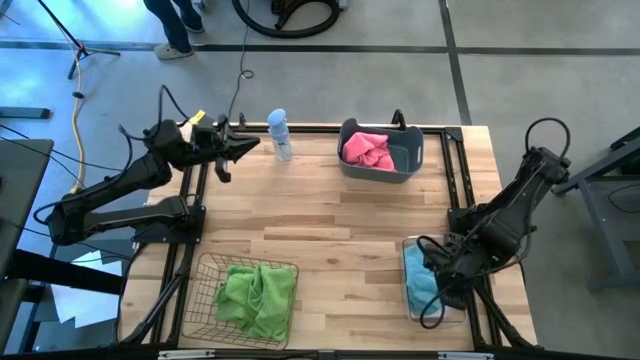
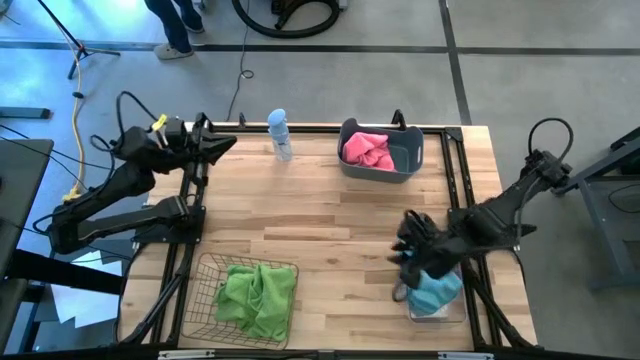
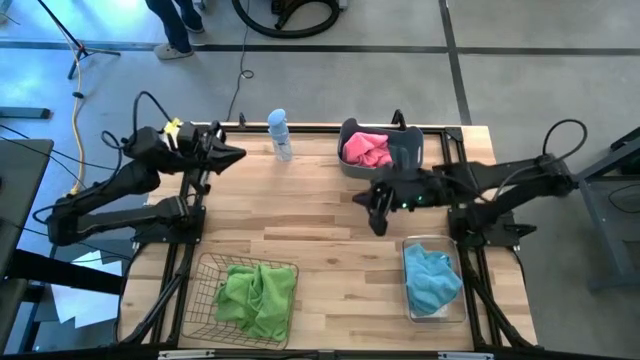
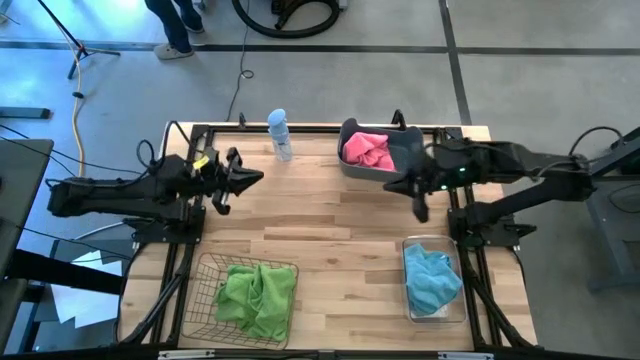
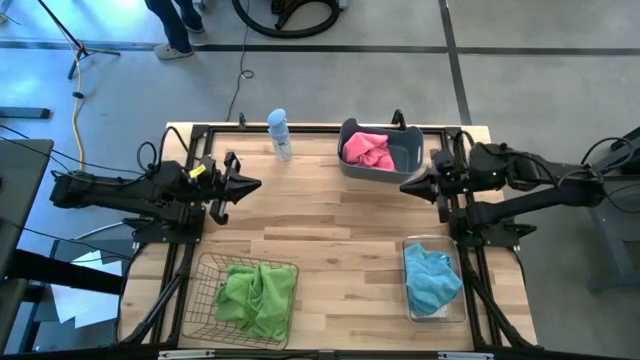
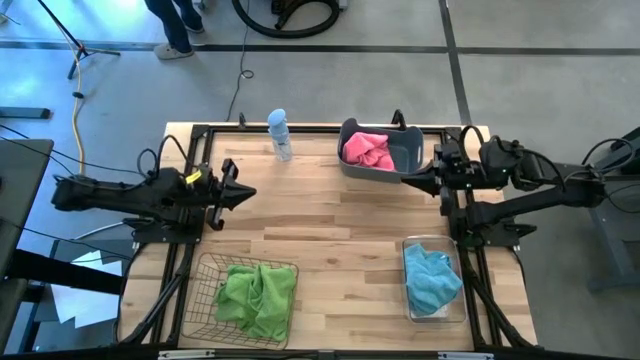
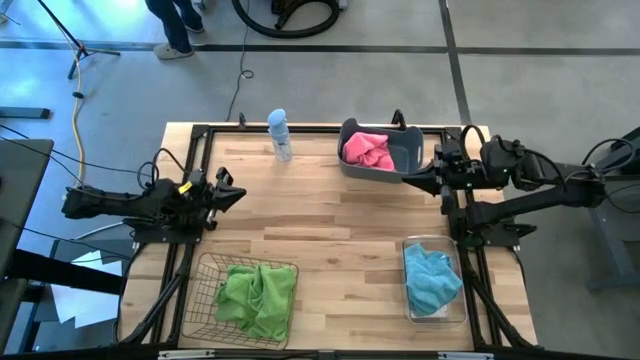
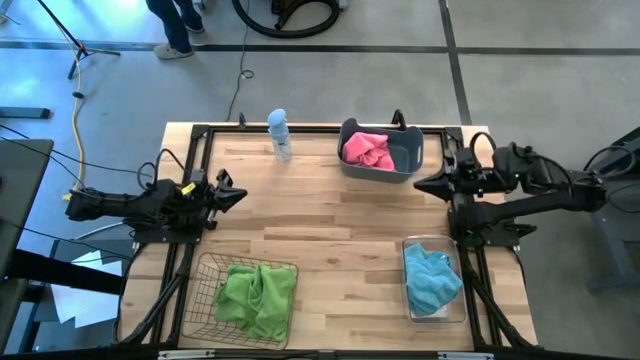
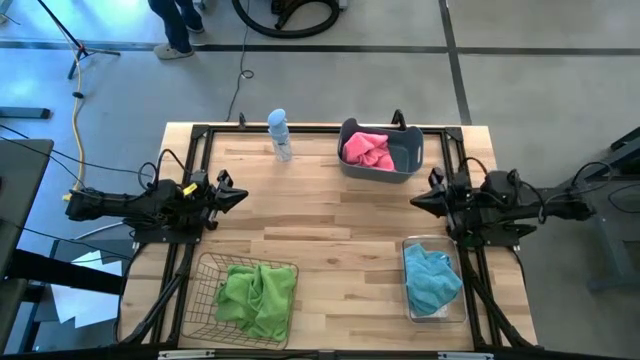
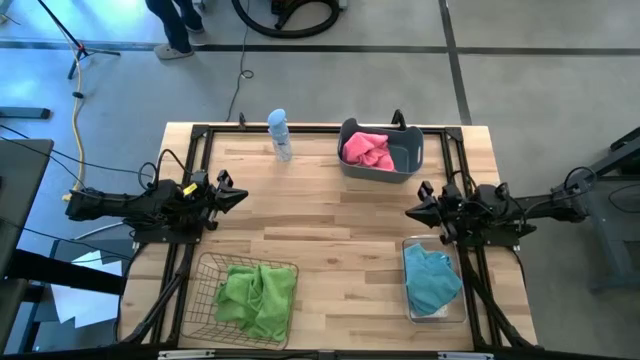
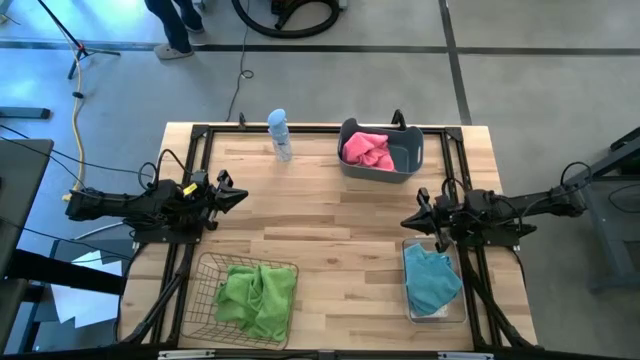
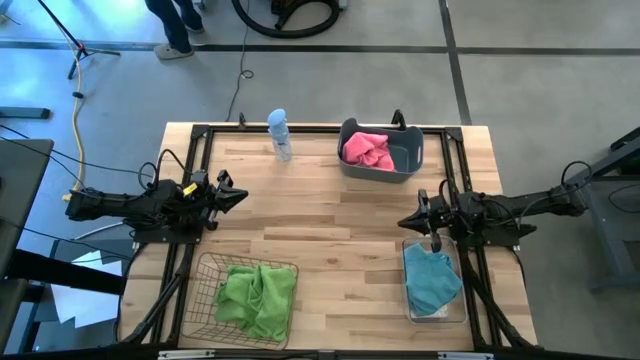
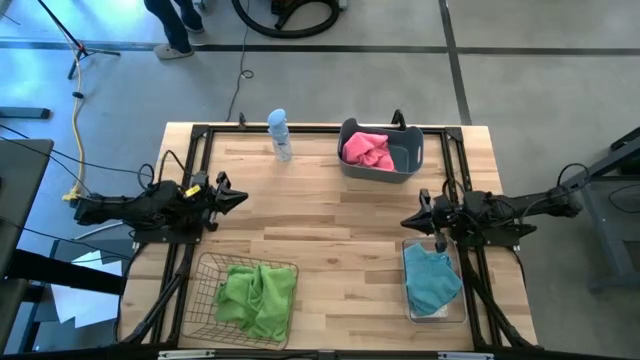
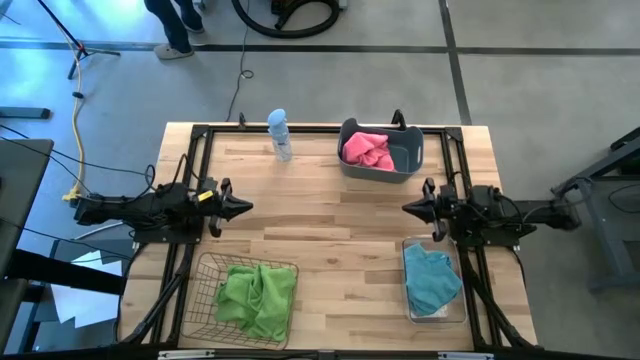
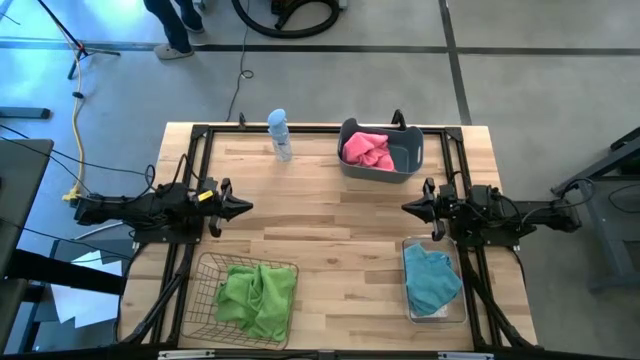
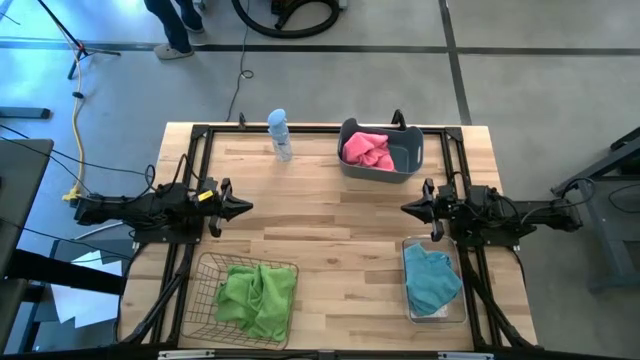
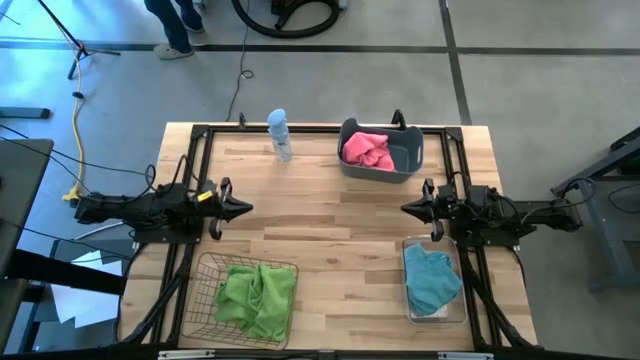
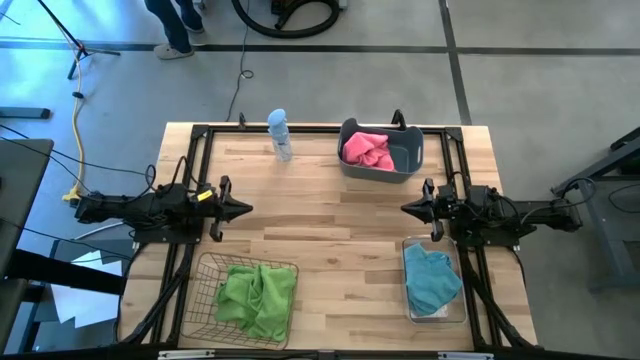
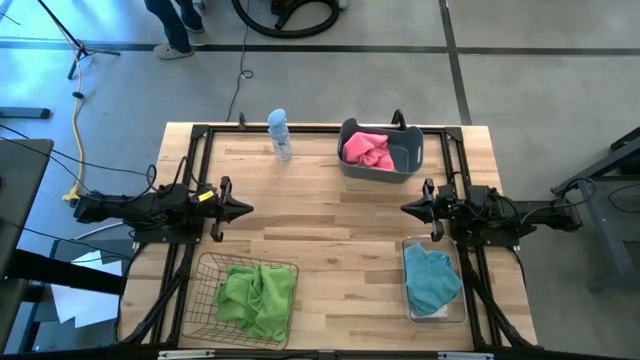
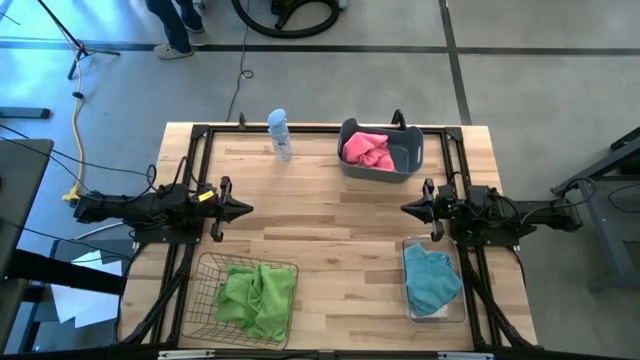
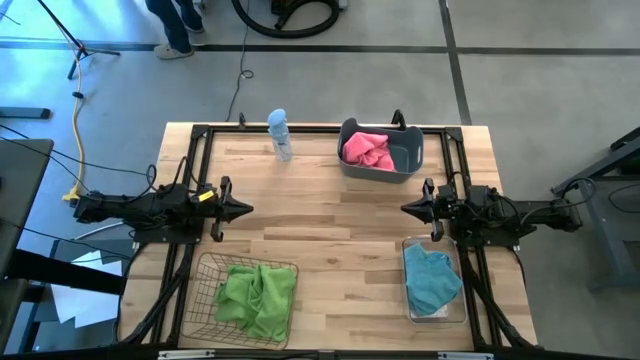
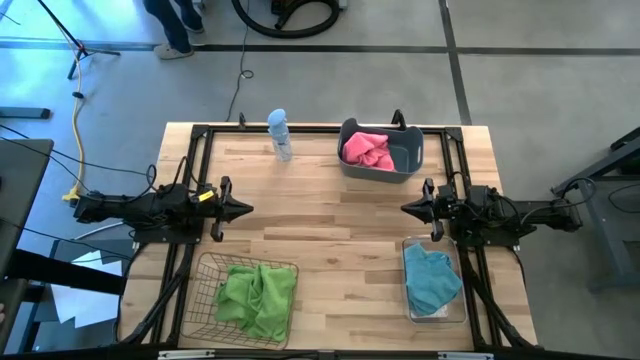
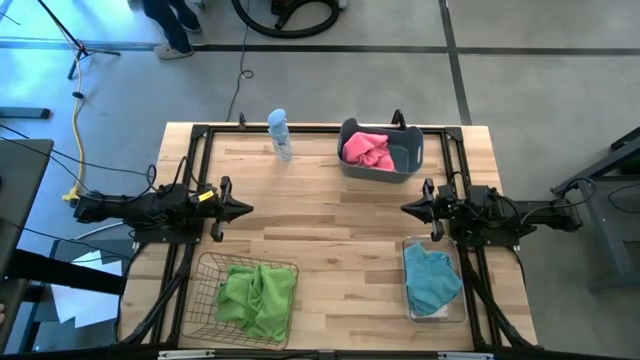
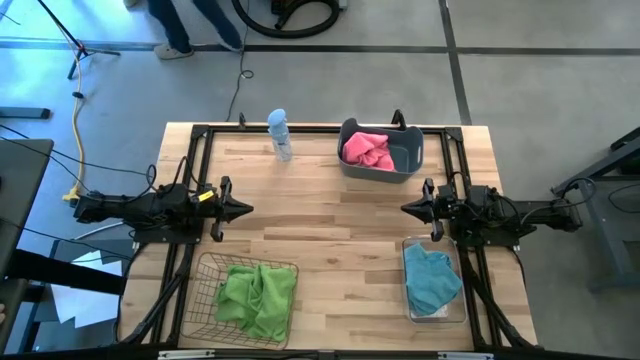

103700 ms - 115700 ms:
Task: Sort microfiber towel by color & place in baskets
Return to Home Position

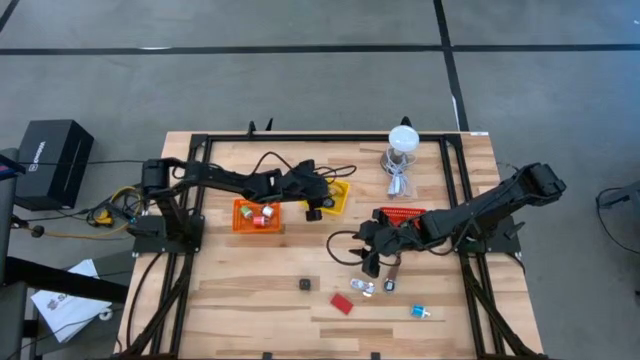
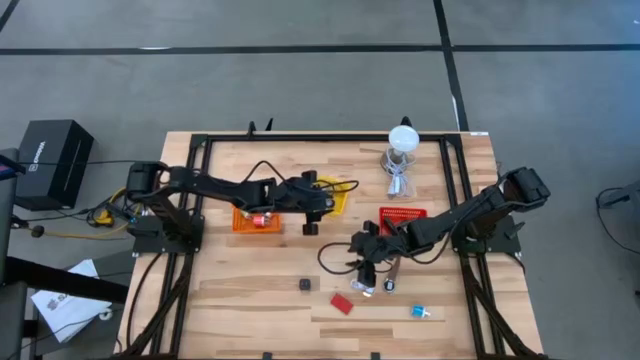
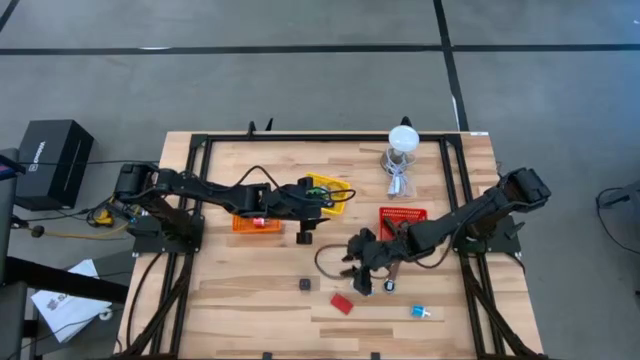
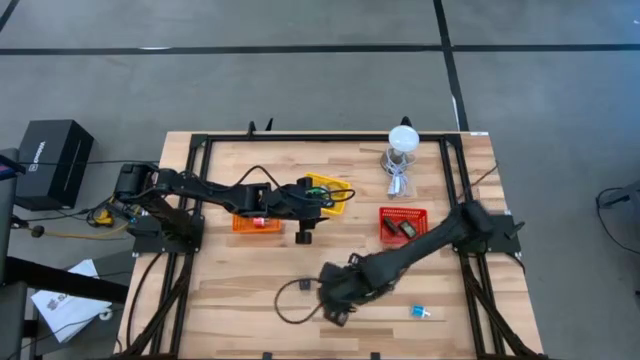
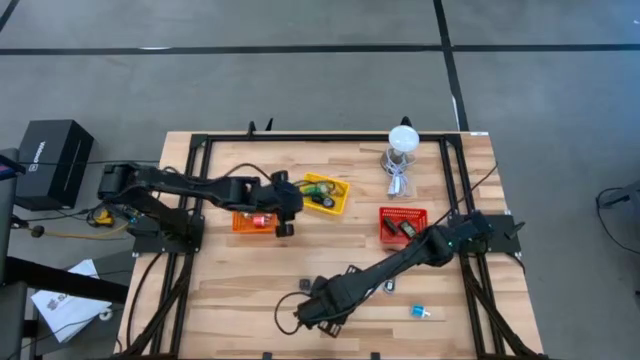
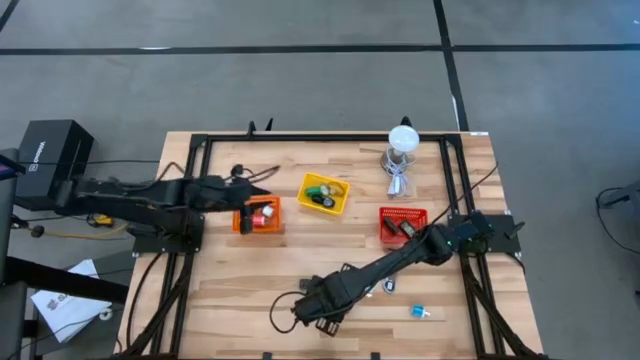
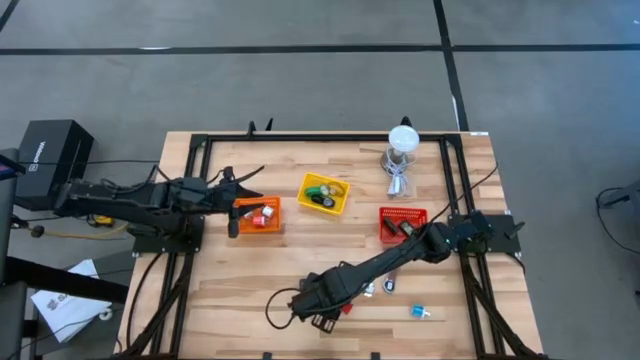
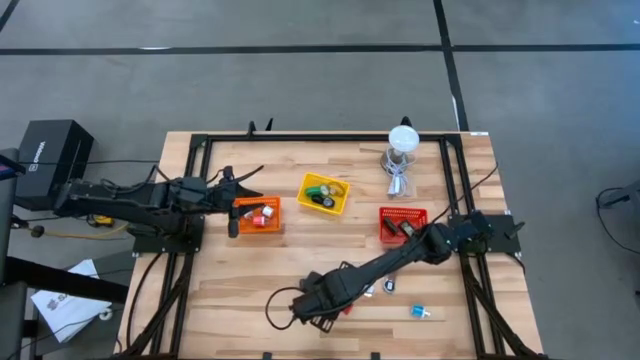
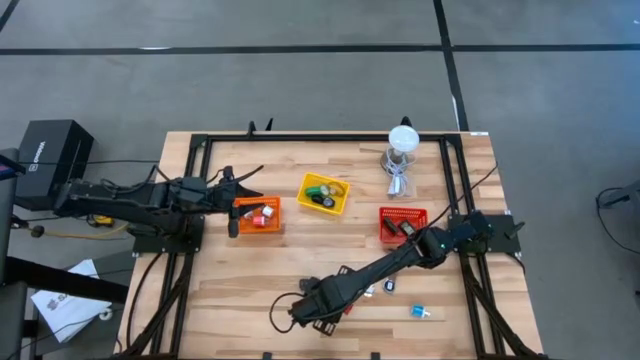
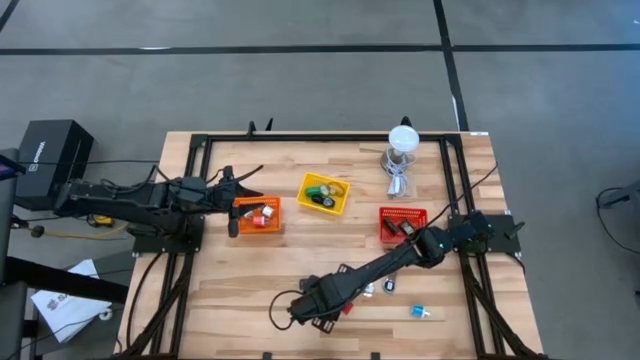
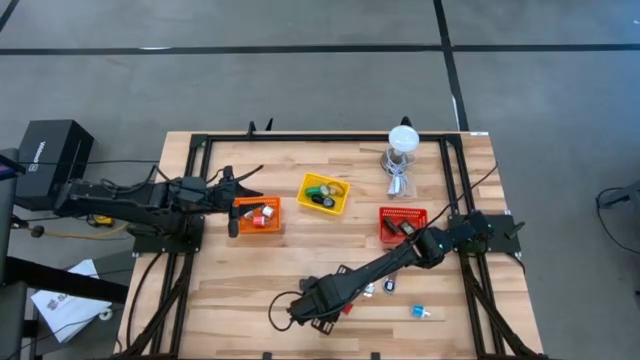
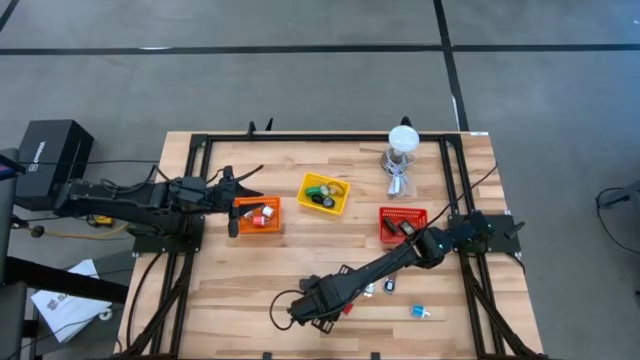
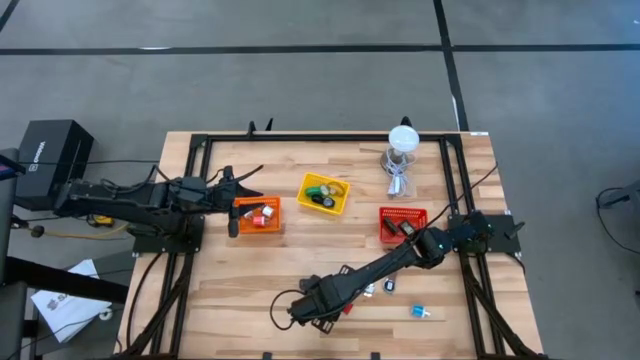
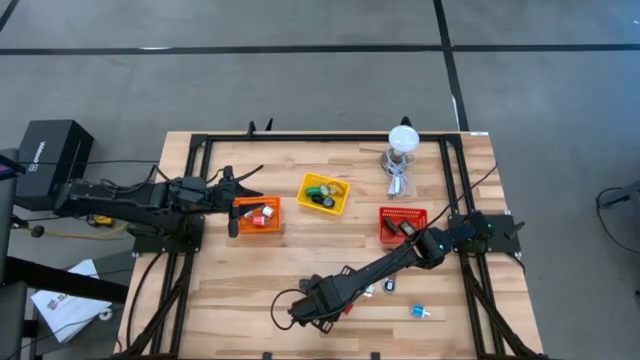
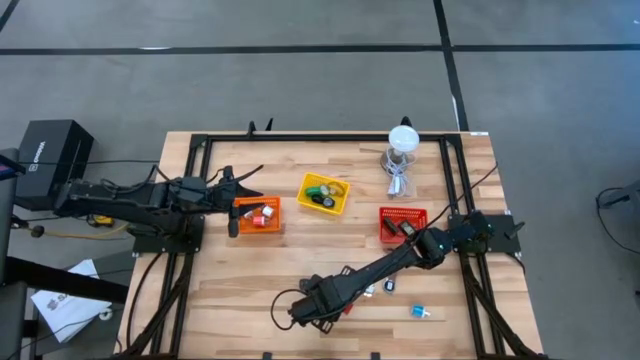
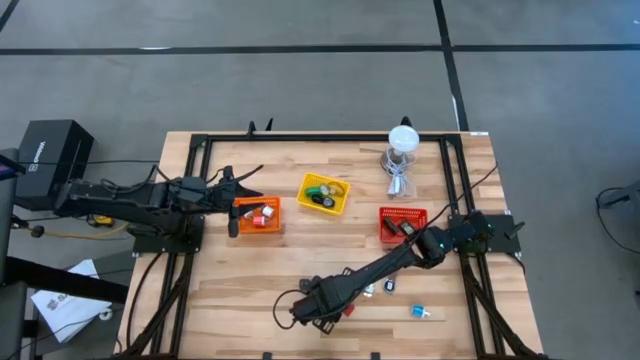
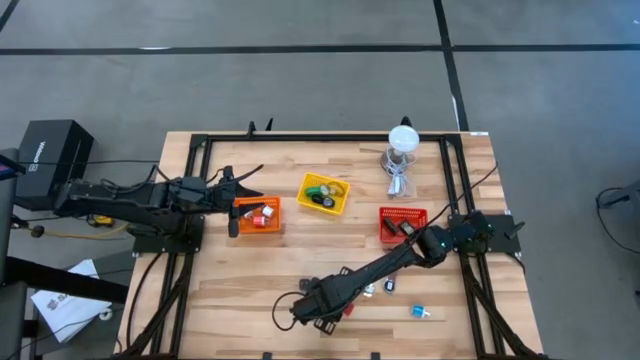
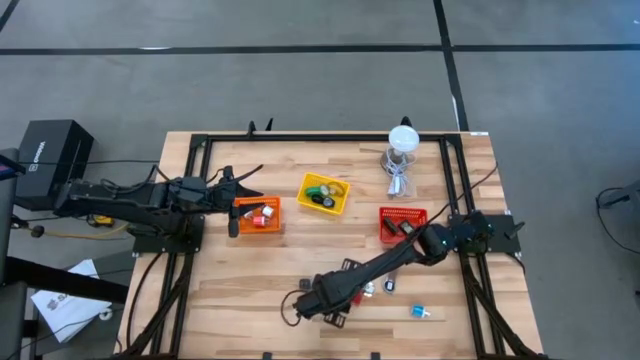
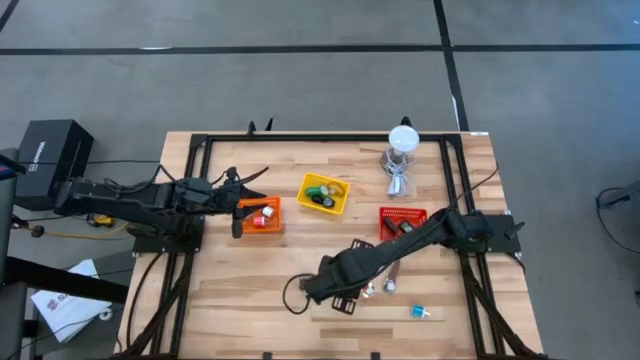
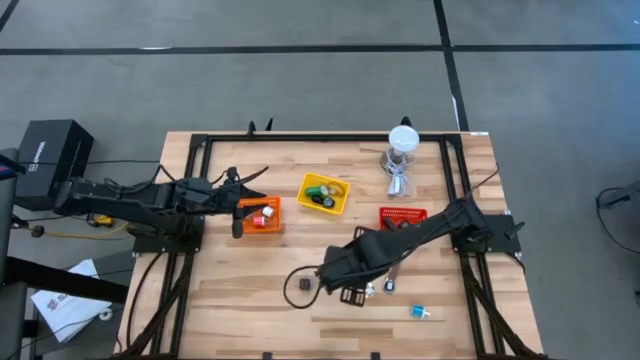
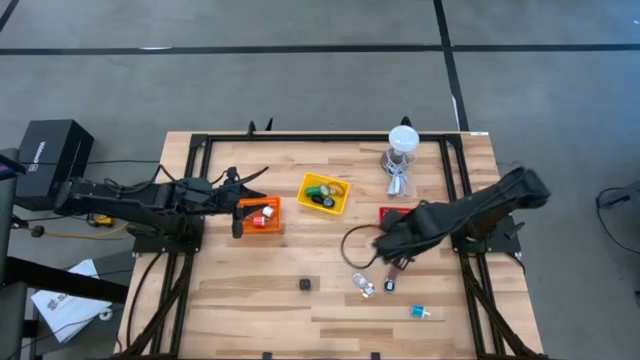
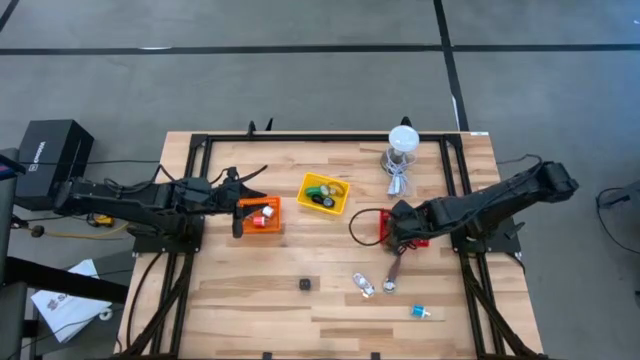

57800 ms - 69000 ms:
Task: Pick & Place Office items
Put the red digital clock into the red bin
